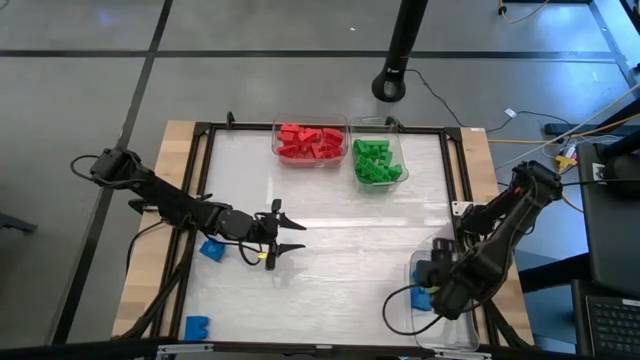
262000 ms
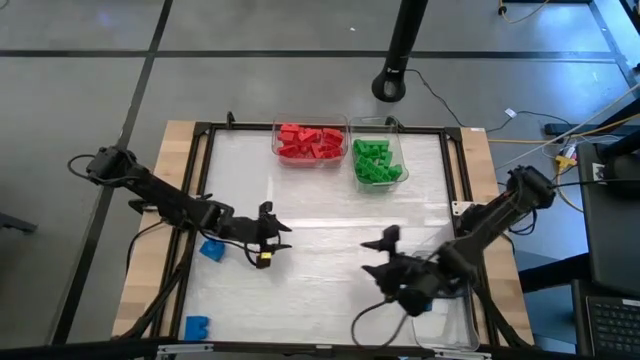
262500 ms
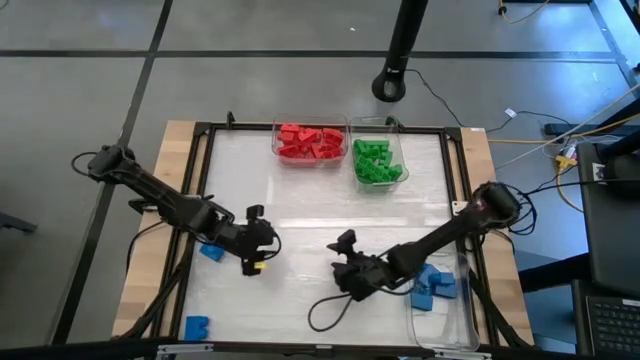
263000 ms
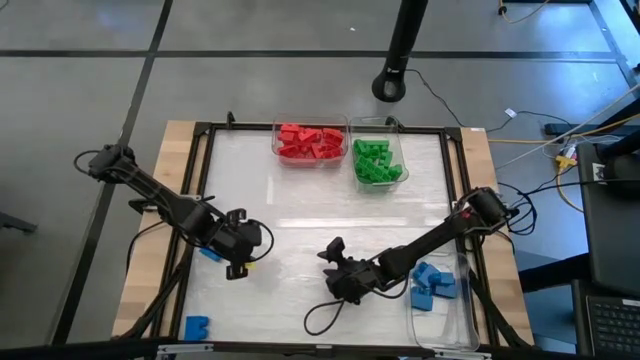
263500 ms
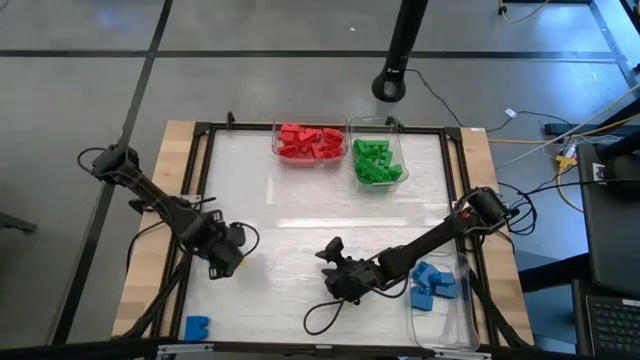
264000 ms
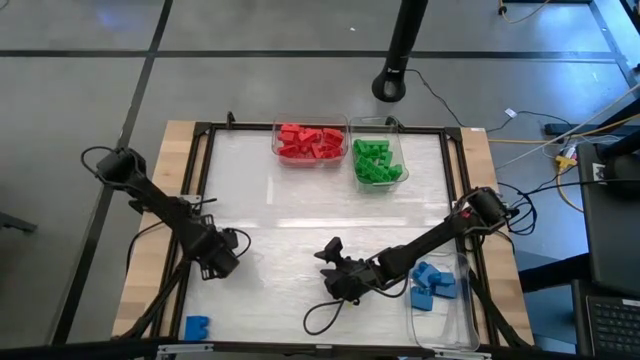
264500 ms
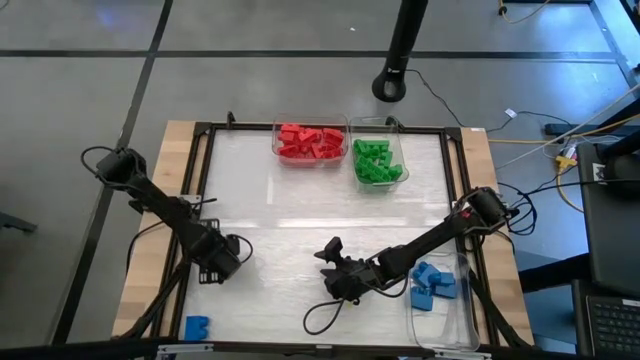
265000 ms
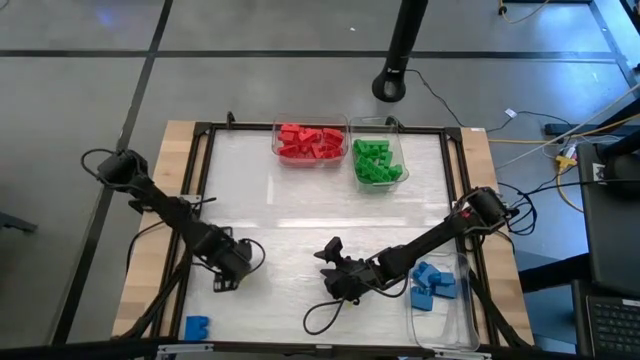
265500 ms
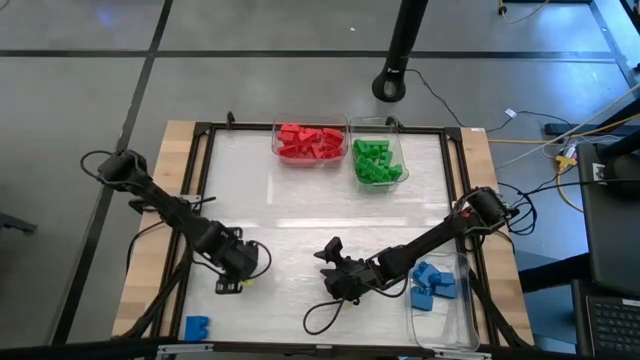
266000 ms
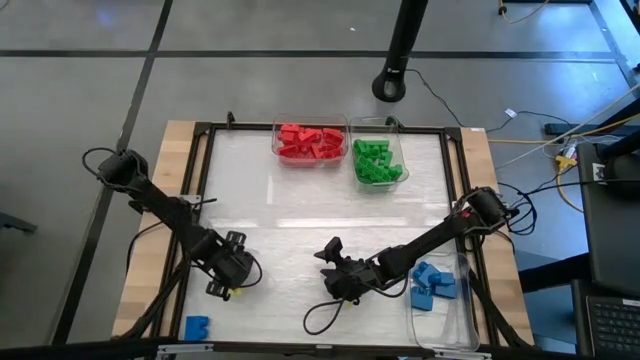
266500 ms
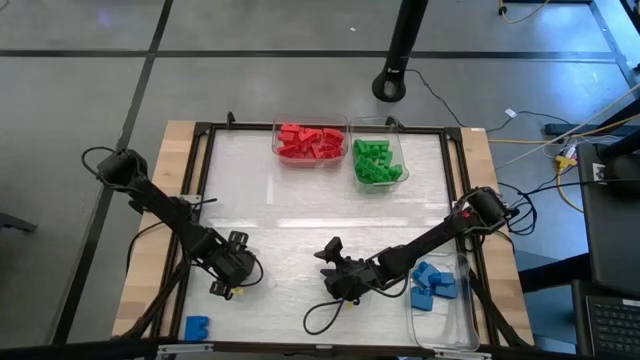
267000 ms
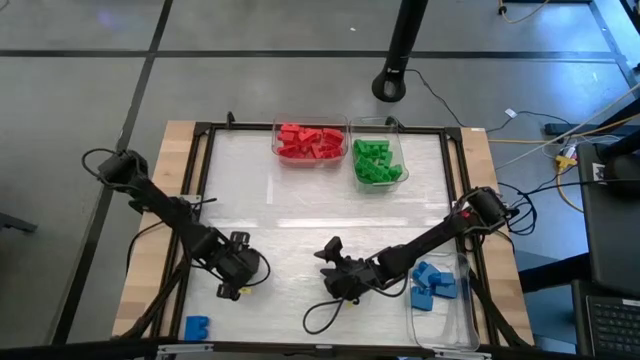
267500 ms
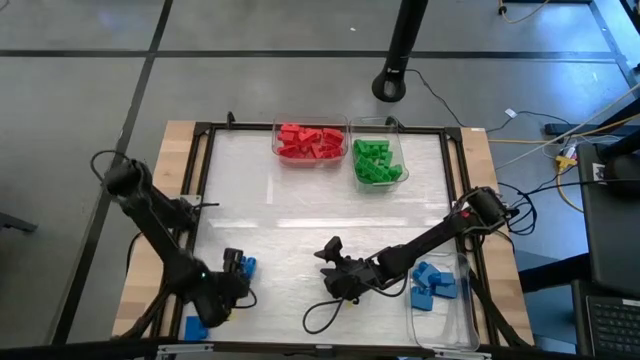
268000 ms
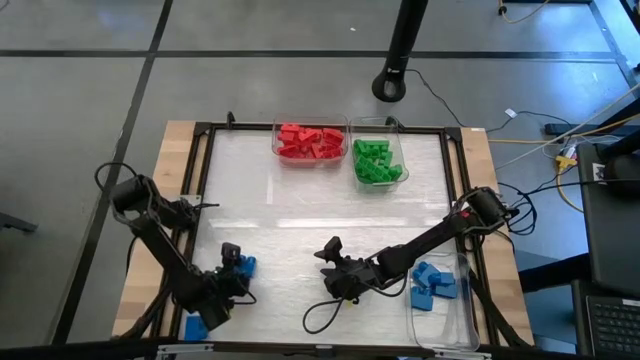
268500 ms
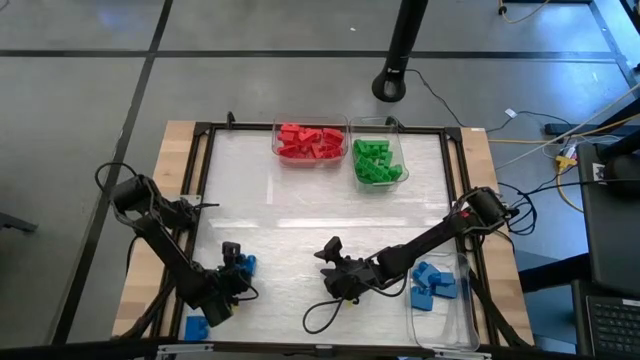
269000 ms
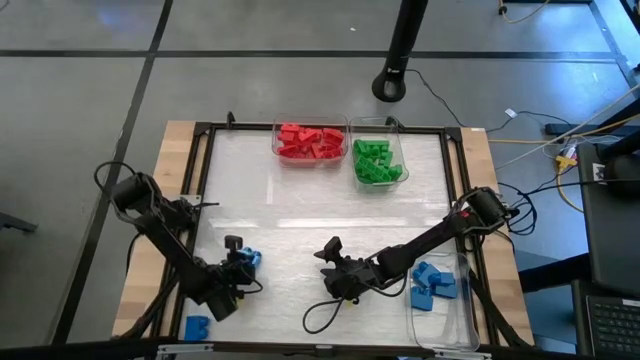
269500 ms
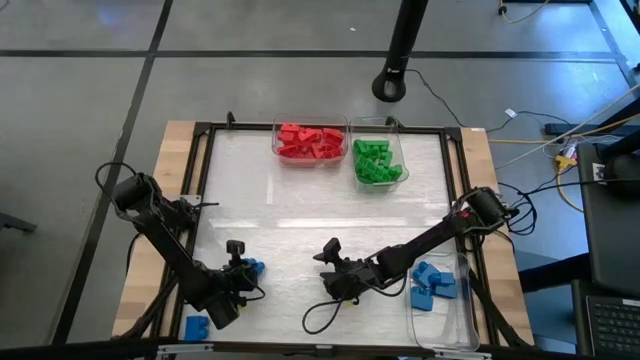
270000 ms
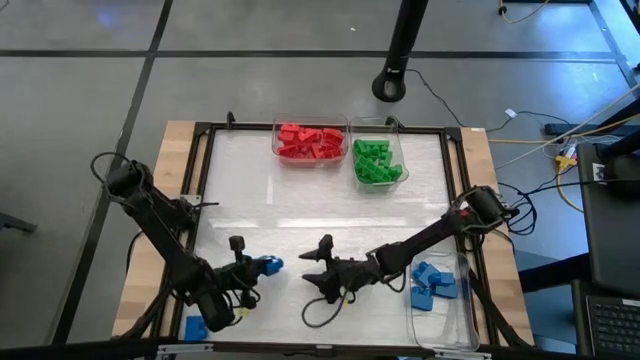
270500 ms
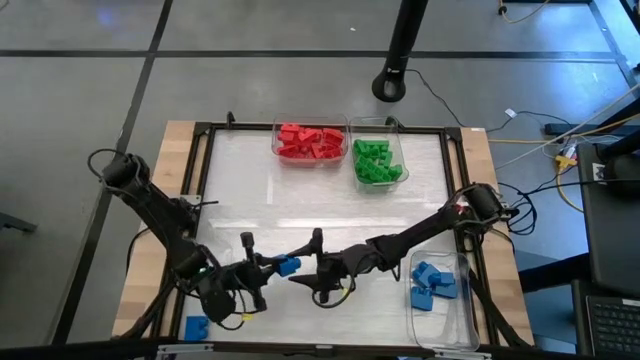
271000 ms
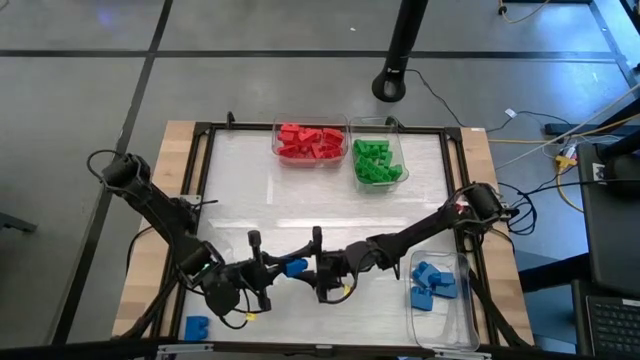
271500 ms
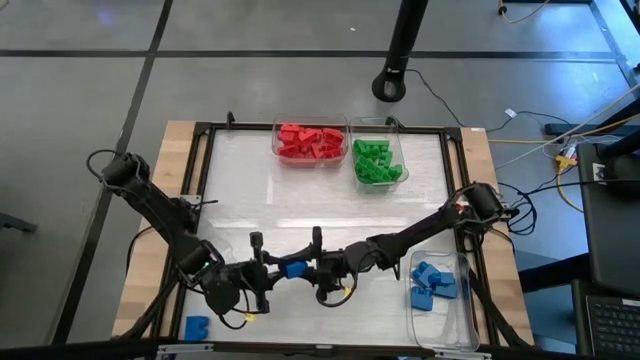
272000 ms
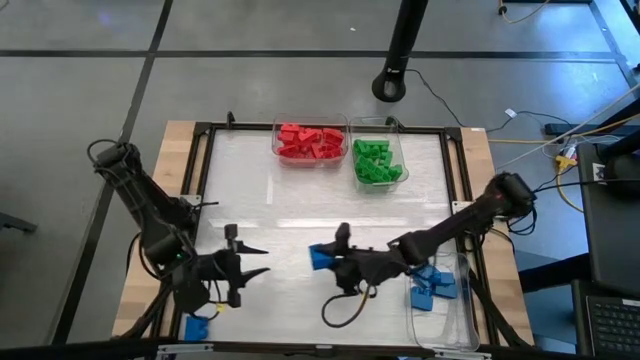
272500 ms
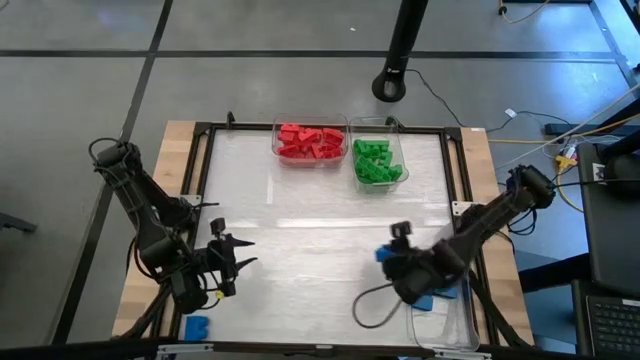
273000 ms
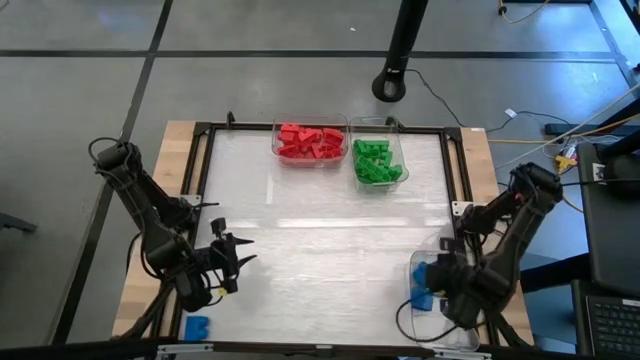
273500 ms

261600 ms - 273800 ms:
Task: Sort blocks
Put the blue game piece into the bottom transparent bin

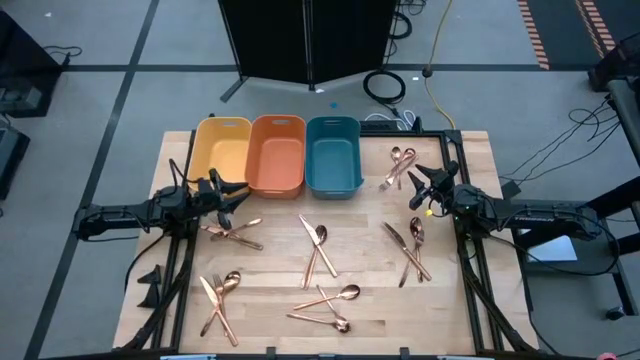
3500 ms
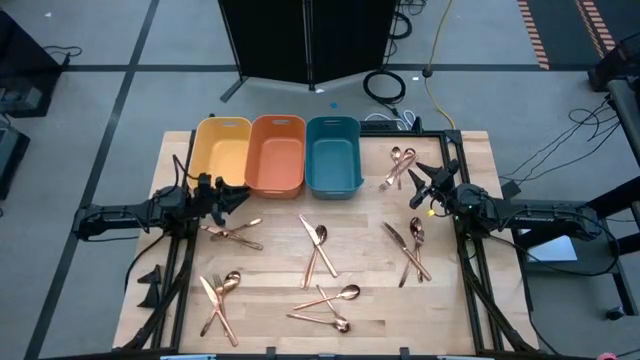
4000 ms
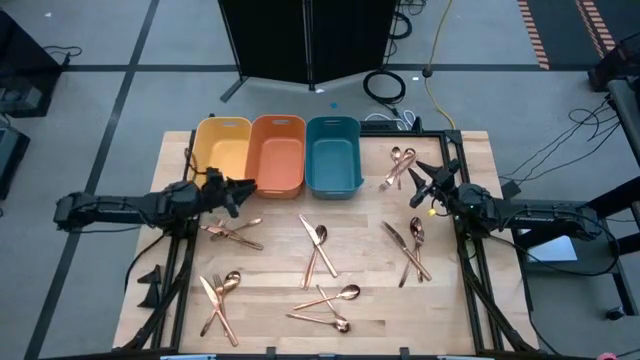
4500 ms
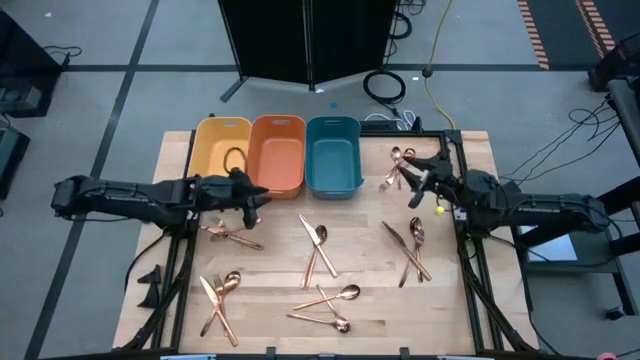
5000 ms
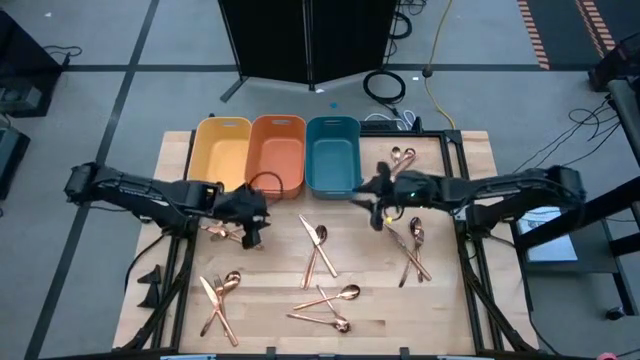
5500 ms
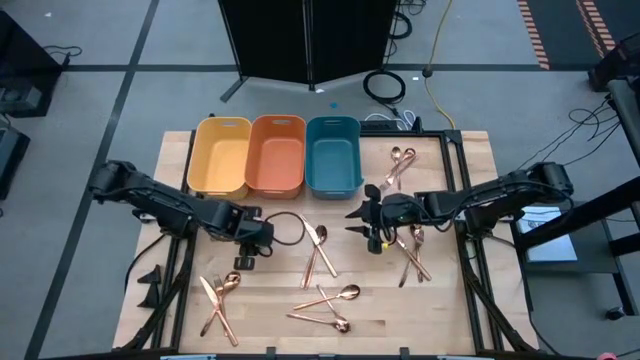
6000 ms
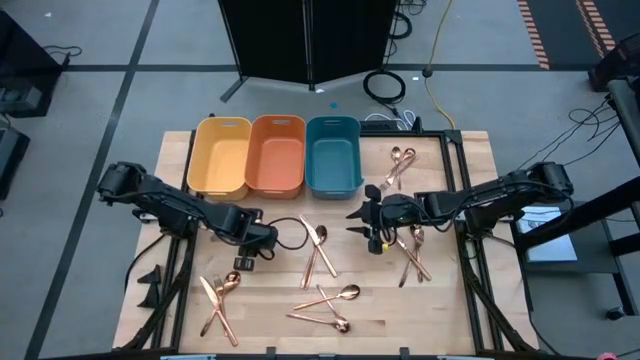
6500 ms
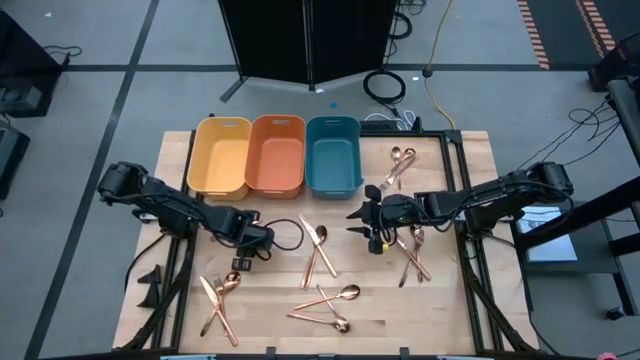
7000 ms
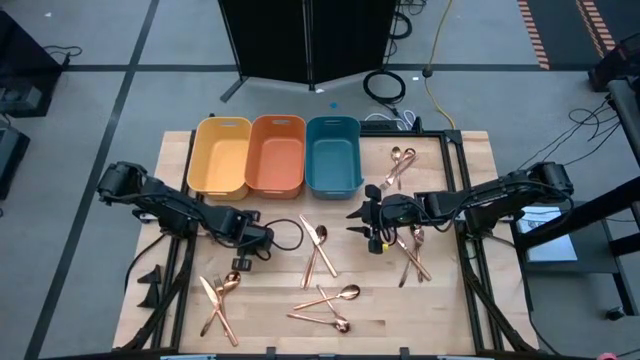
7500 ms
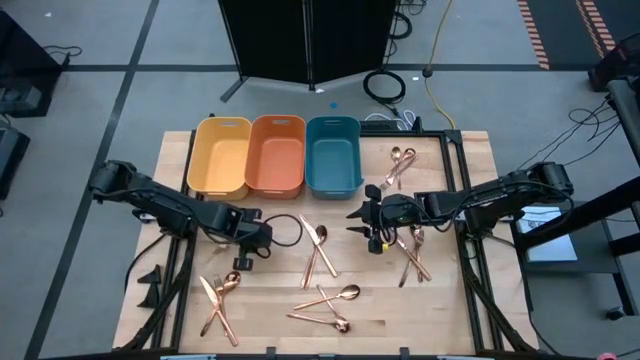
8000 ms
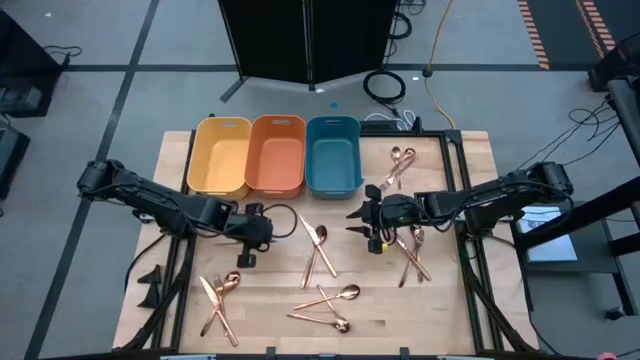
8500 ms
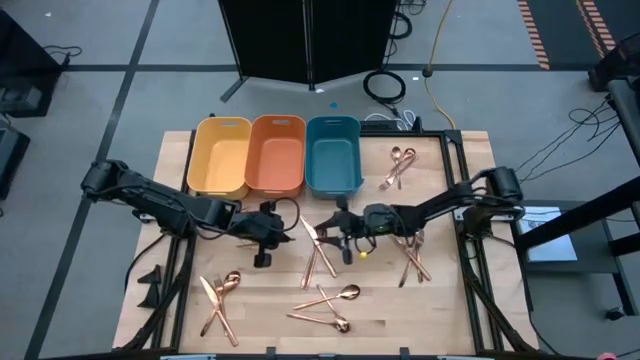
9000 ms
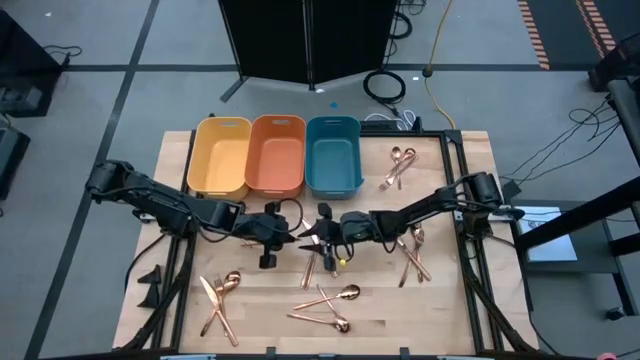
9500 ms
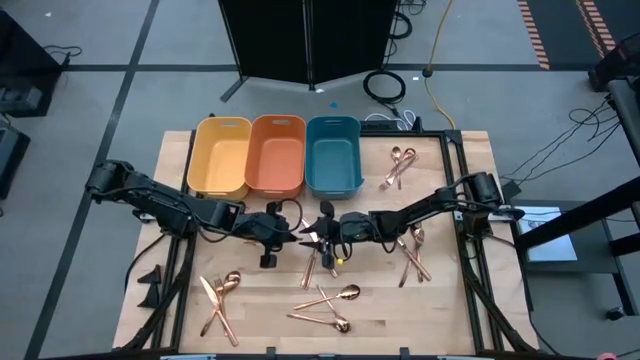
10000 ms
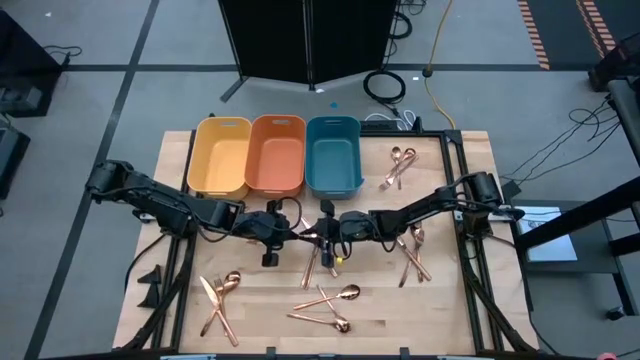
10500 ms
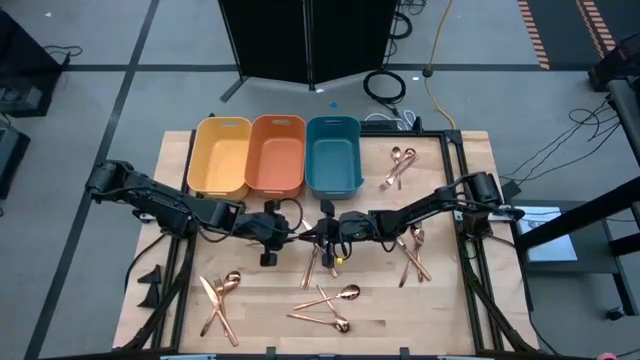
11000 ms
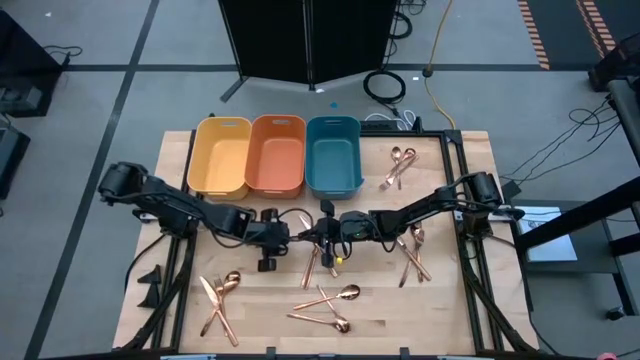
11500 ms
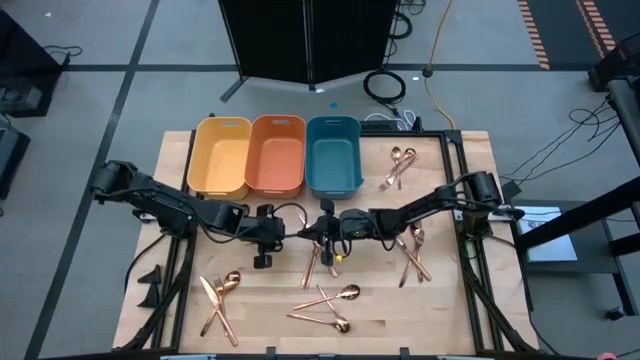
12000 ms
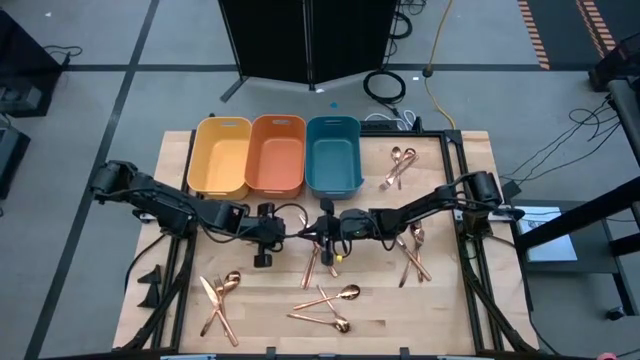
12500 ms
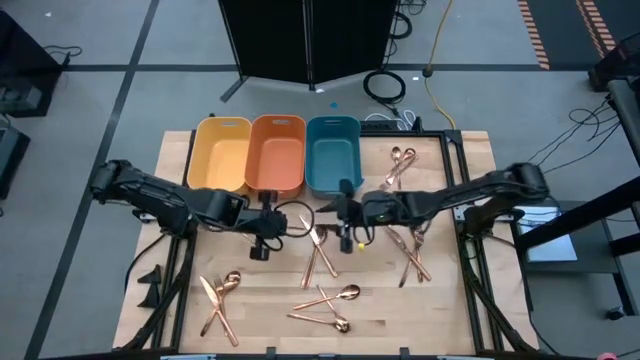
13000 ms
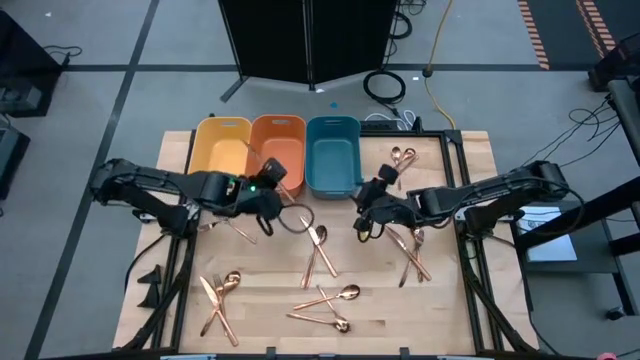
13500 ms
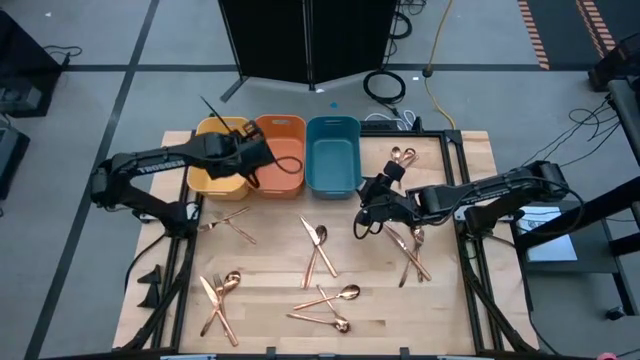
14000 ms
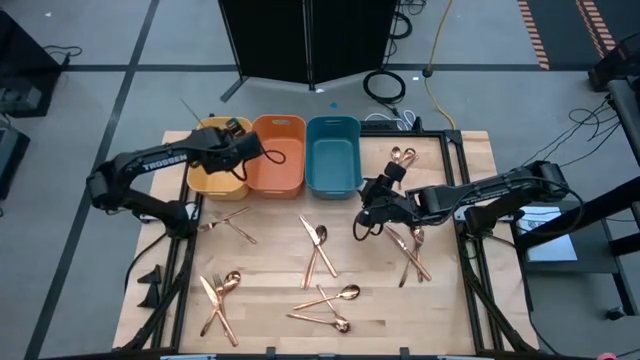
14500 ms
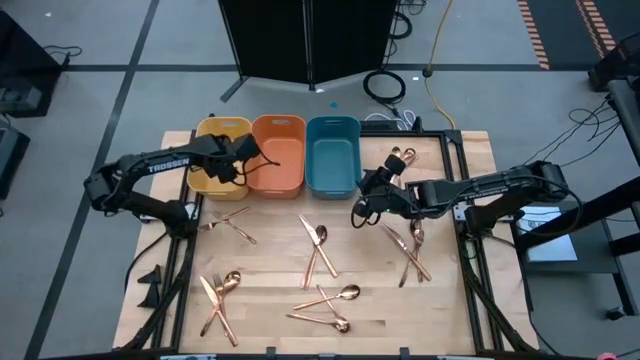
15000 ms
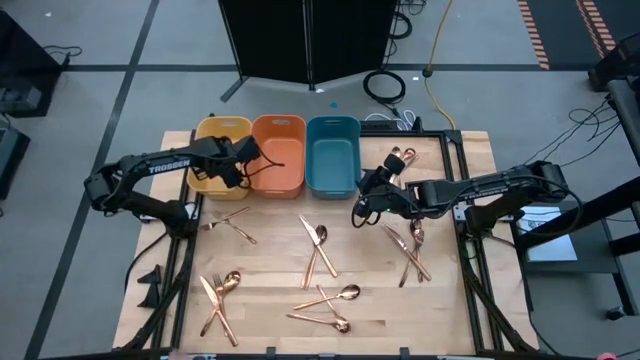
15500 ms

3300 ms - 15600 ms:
Task: Sort silverware
Put the gold table knife into the yellow bin
